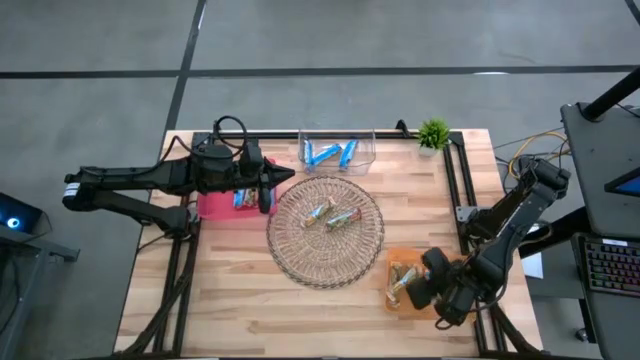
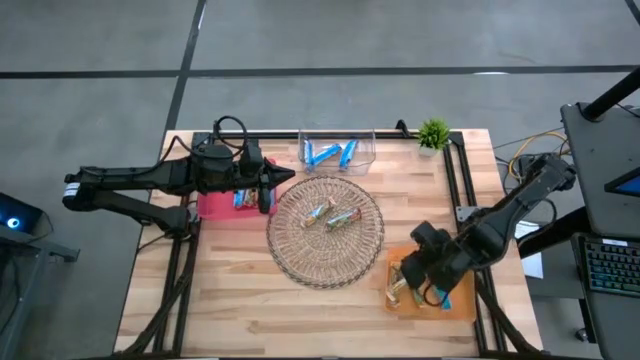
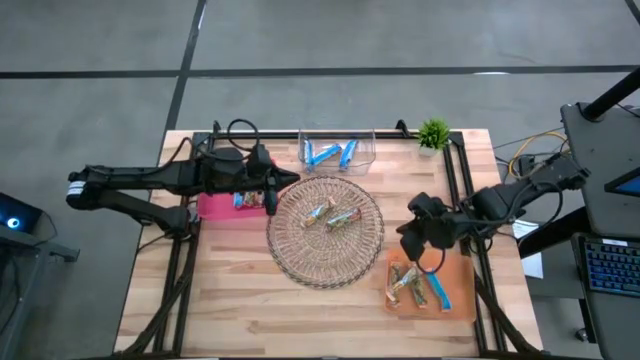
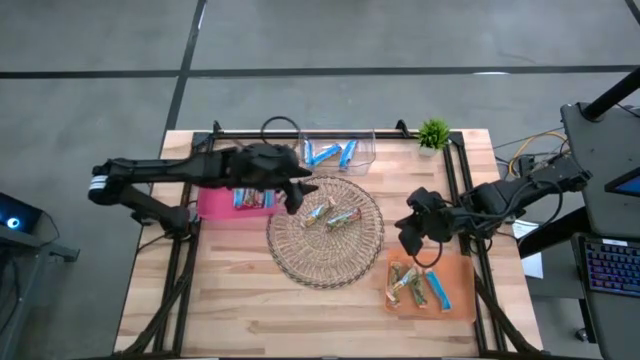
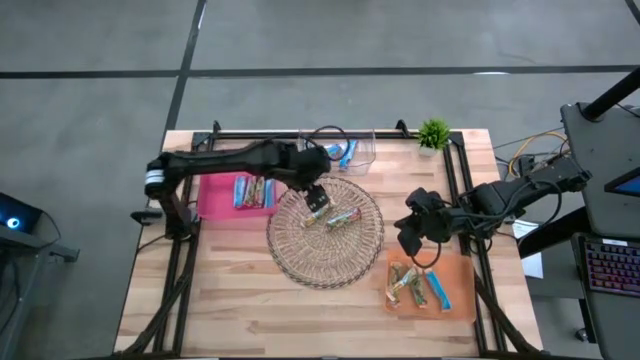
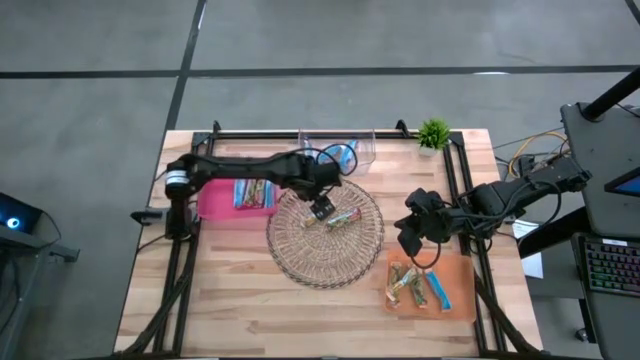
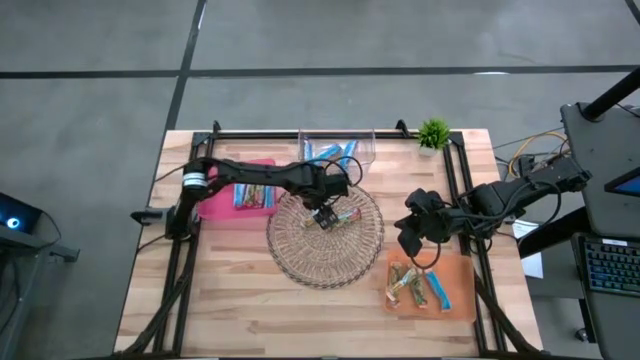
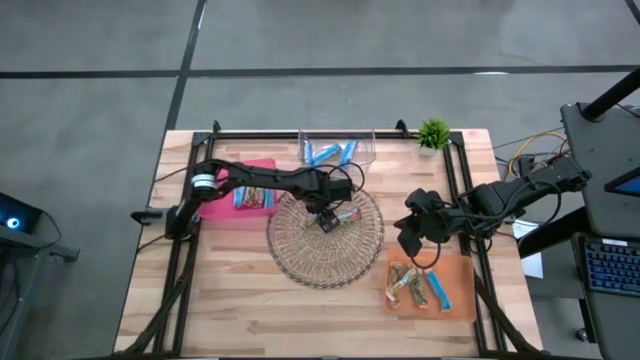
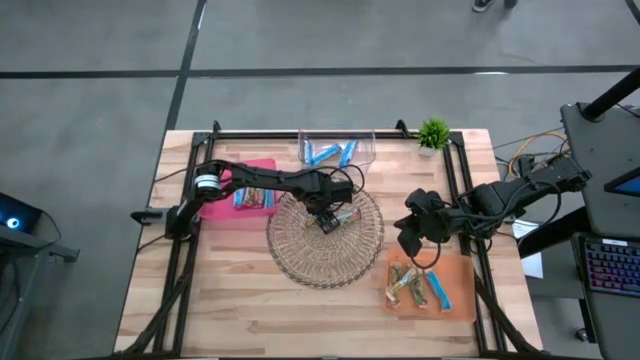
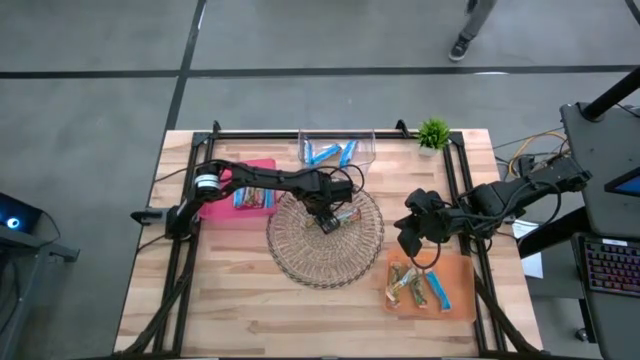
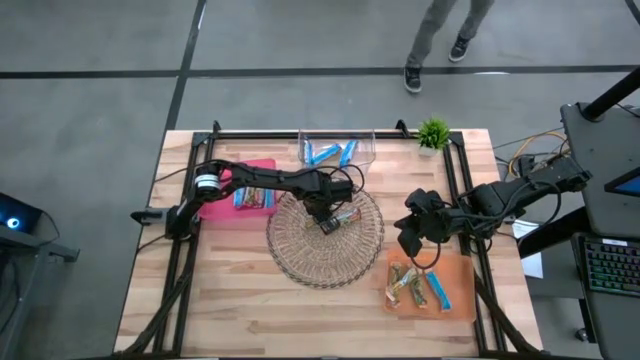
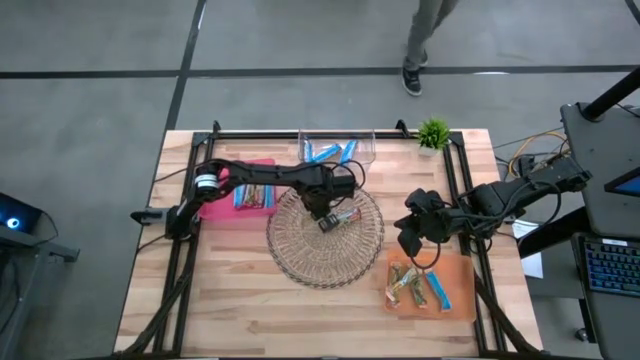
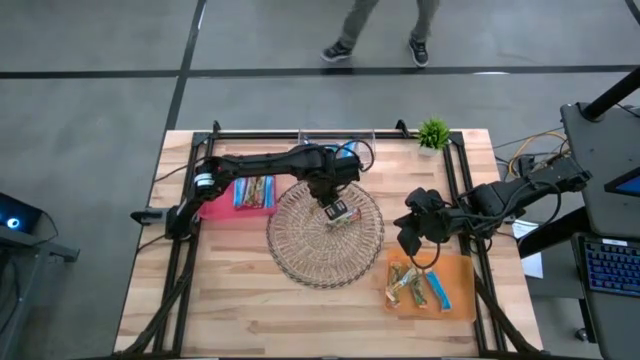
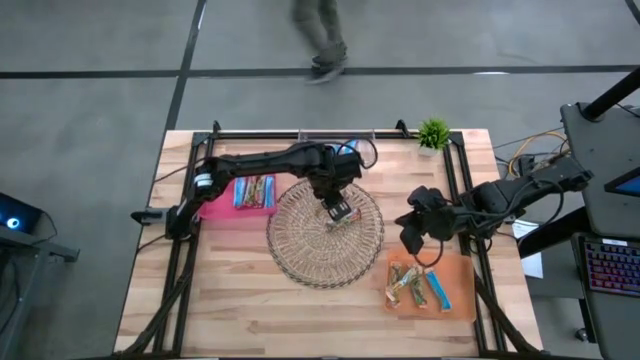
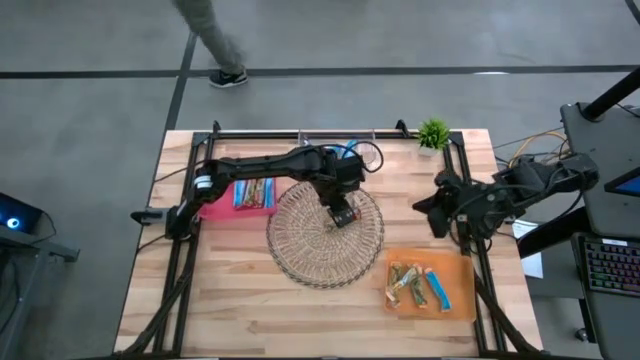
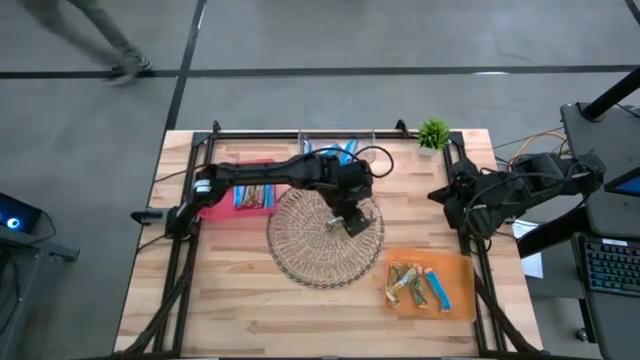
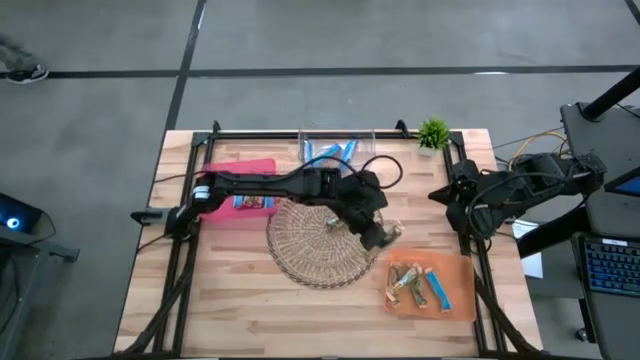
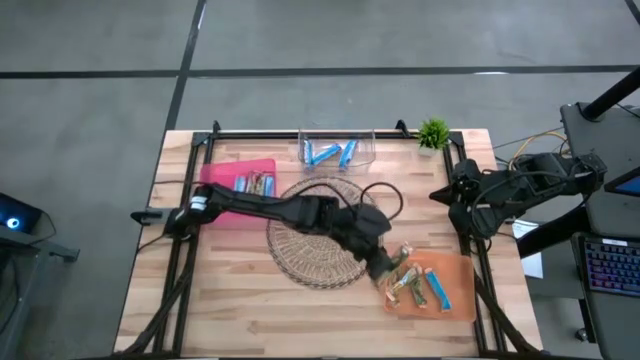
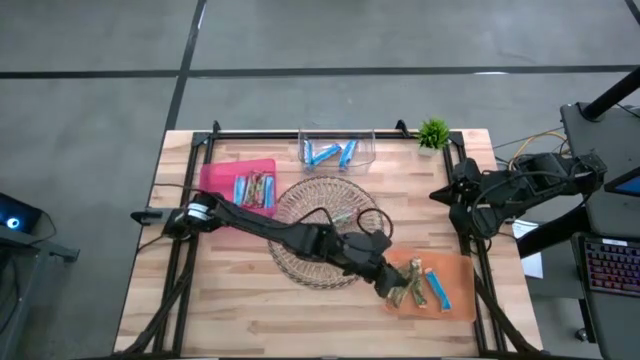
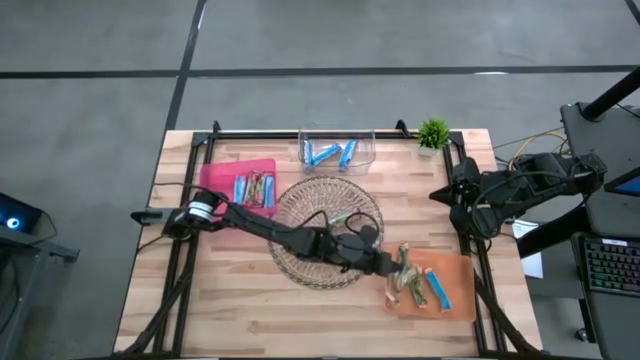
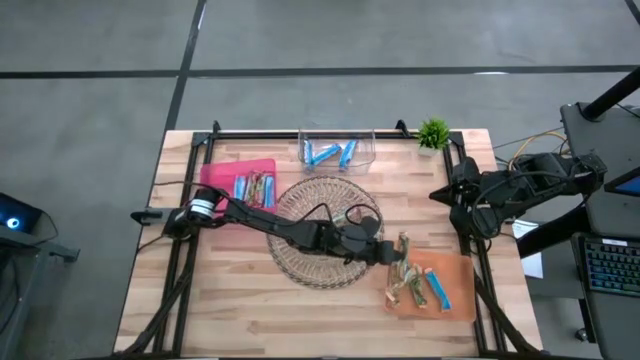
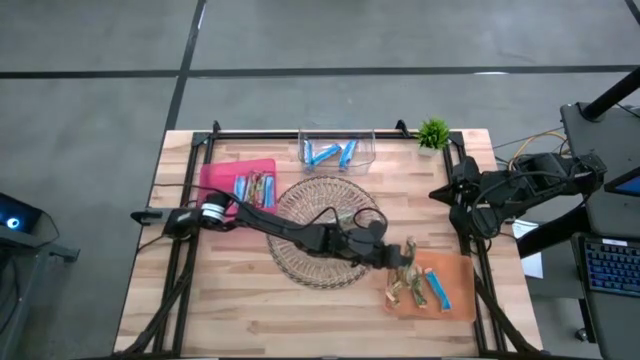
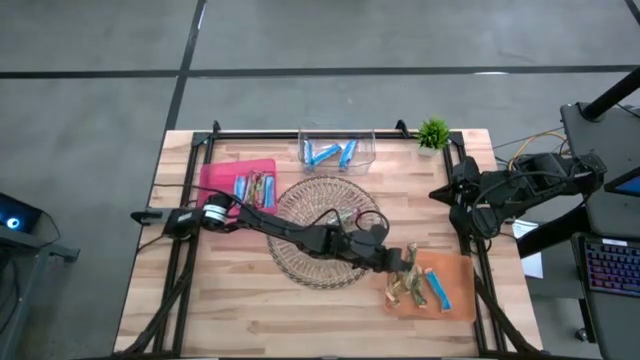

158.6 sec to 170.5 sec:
Task: Pick and place Granola Bars by type
Put the yellow granola bar into the orange bin

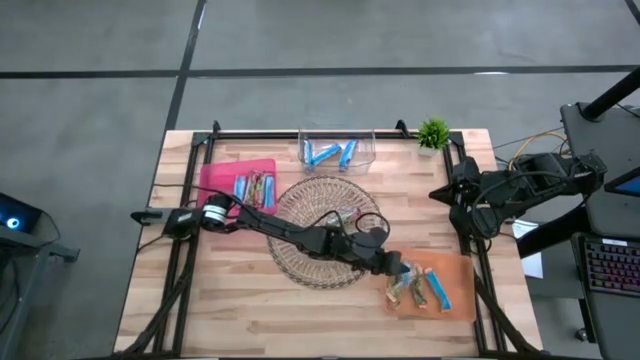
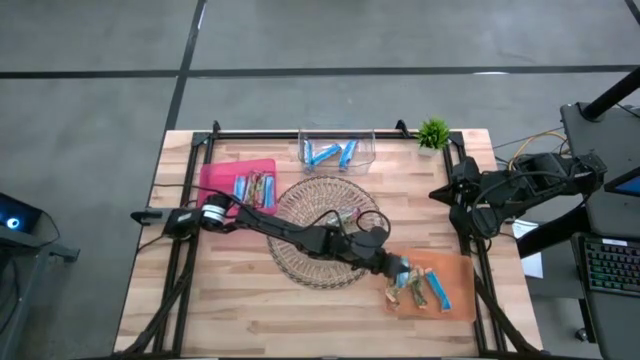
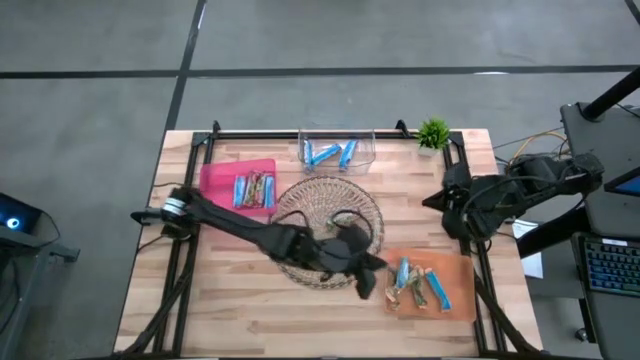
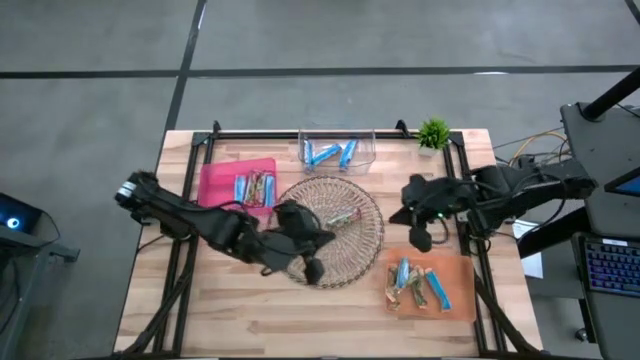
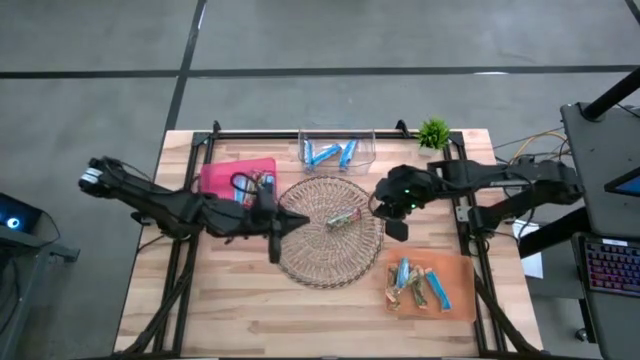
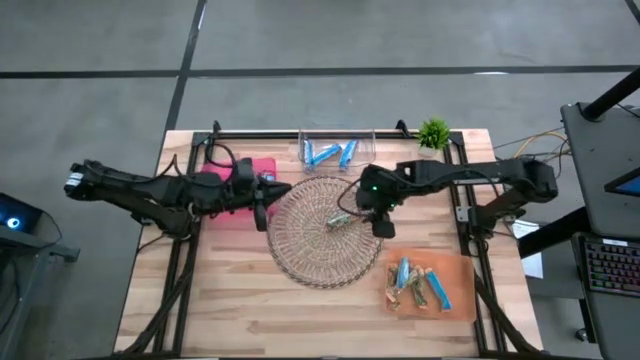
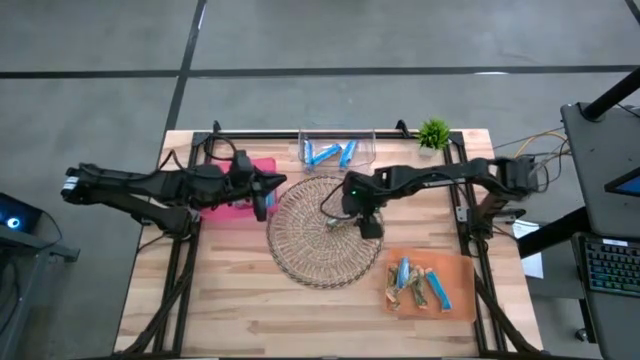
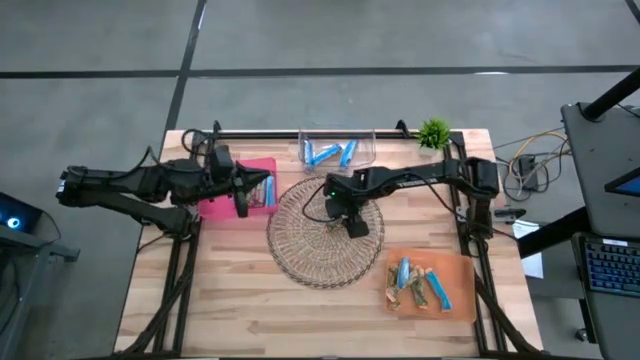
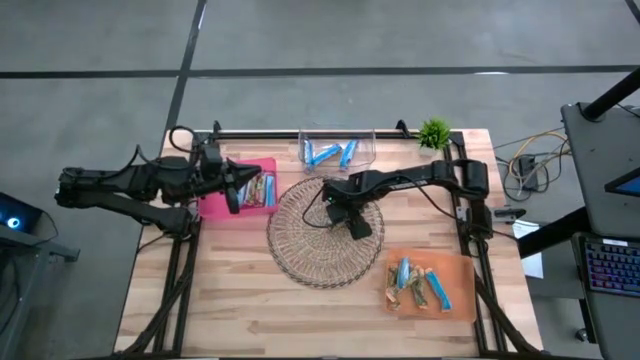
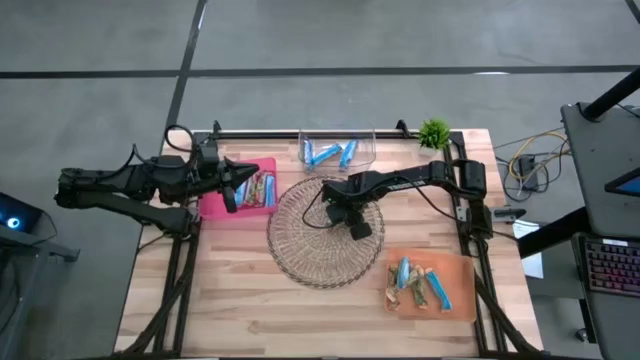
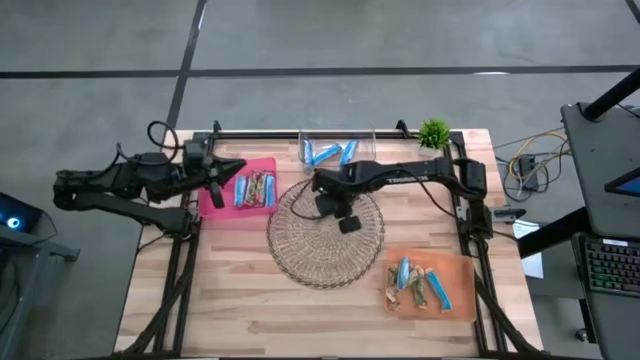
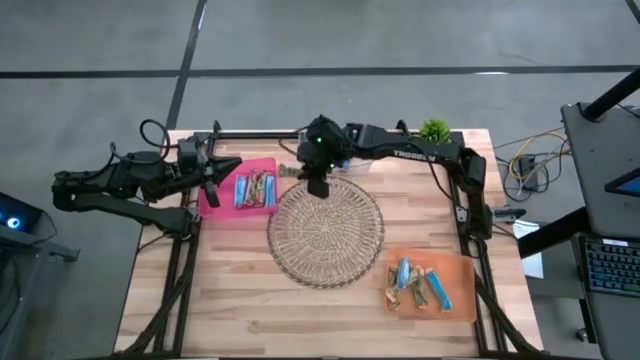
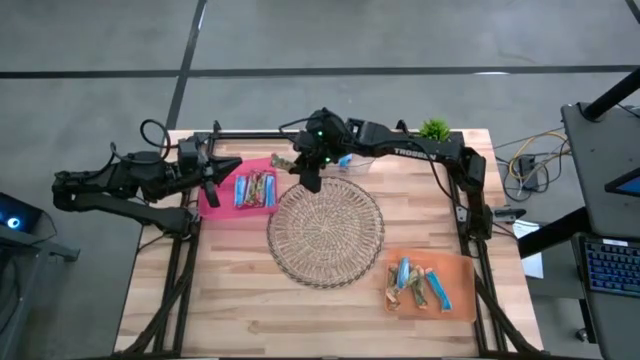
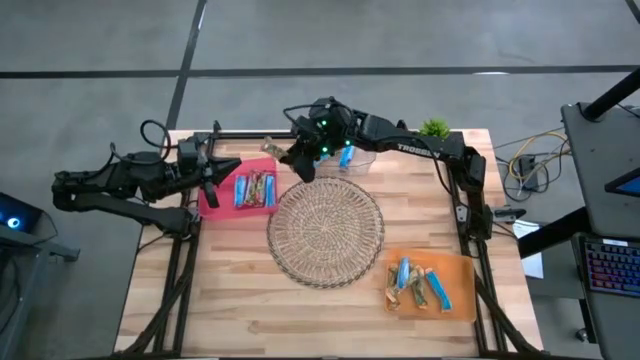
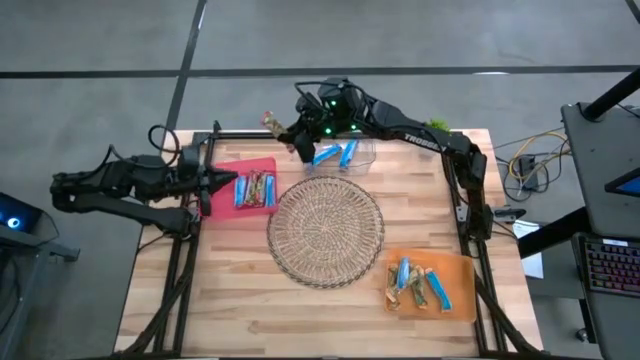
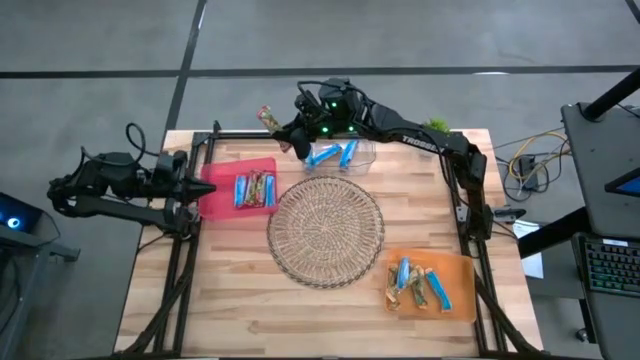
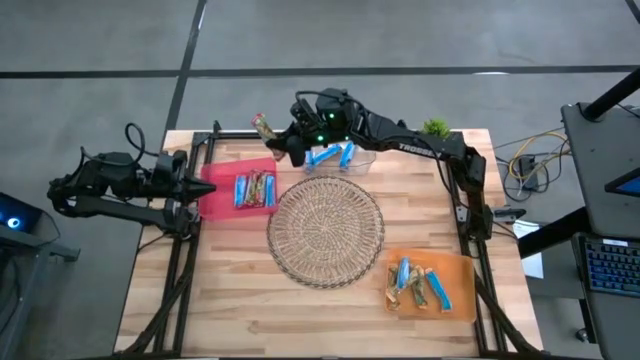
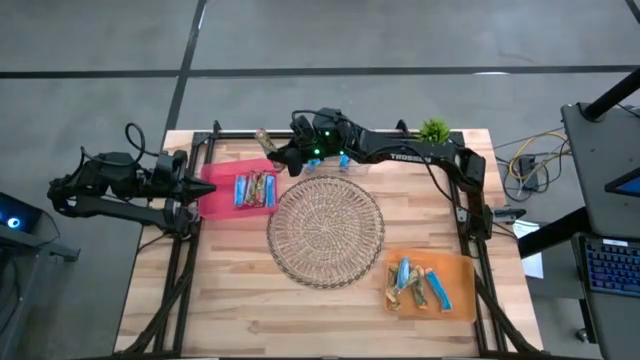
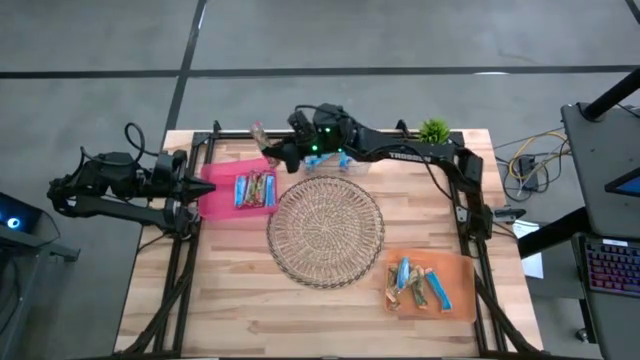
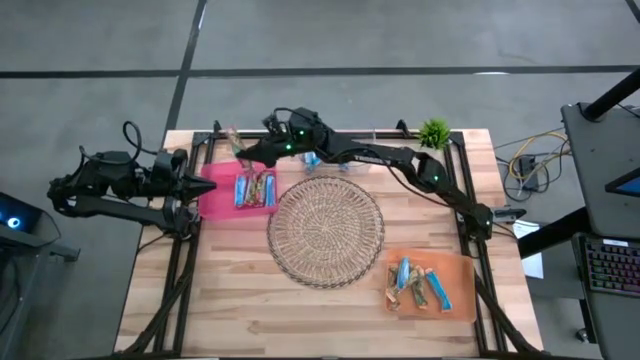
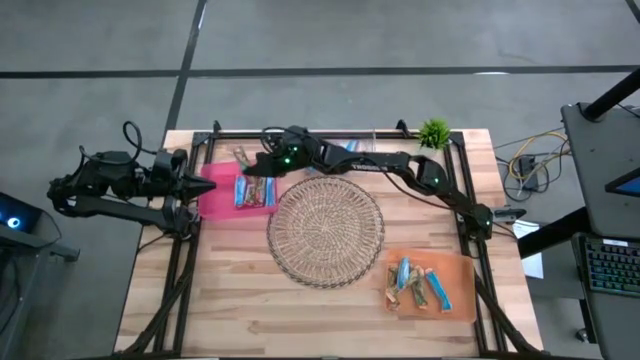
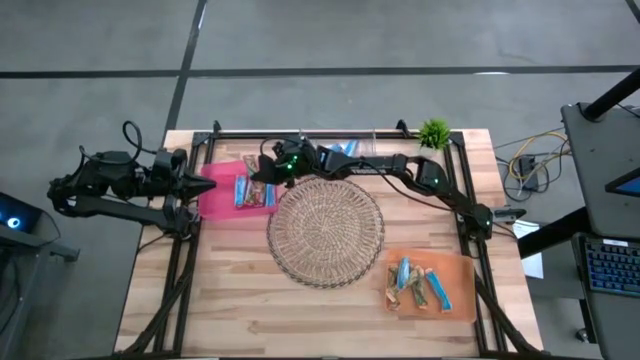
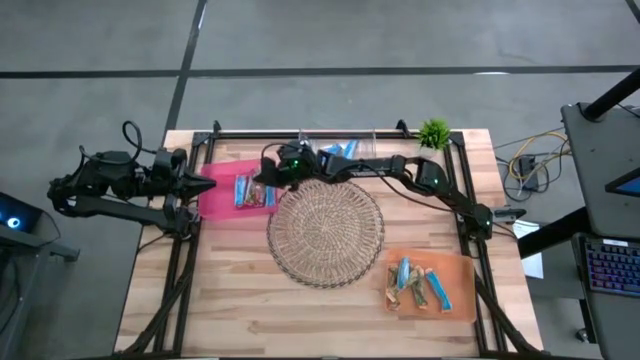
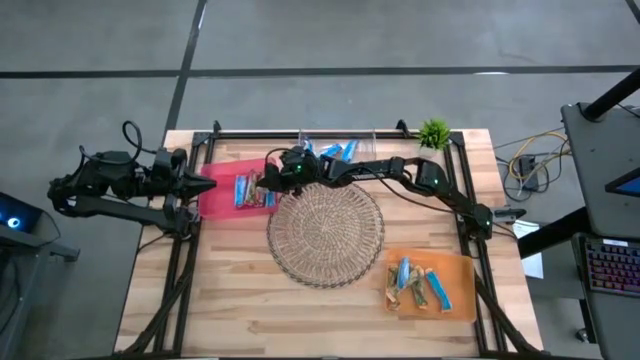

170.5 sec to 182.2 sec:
Put the red granola bar into the red bin
